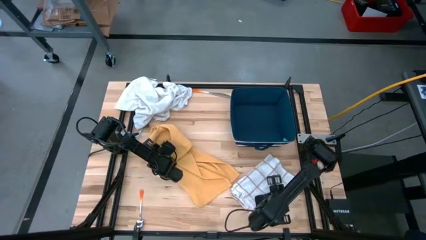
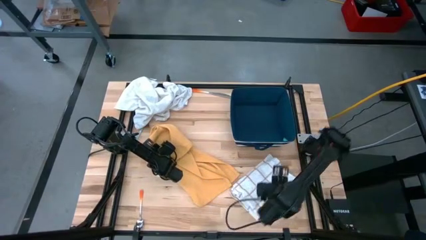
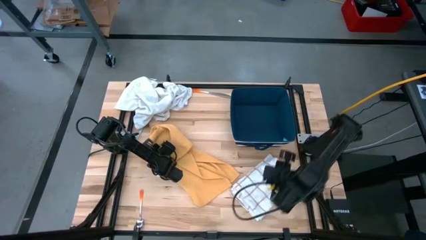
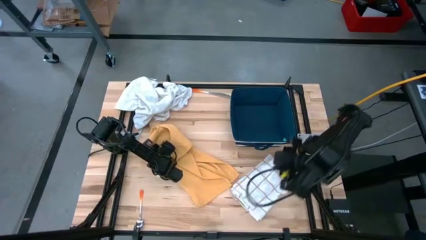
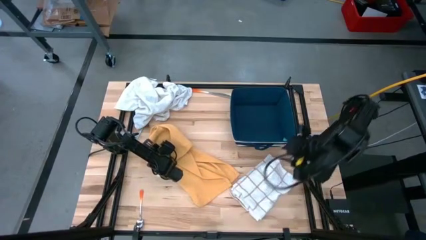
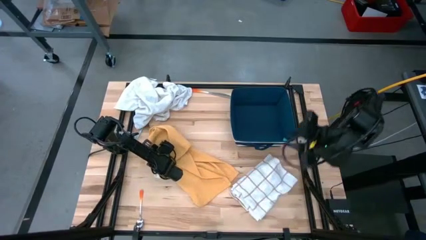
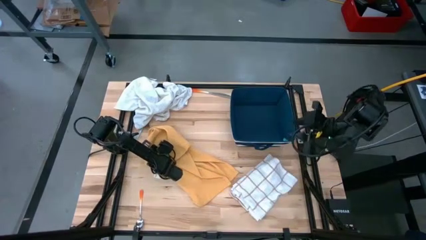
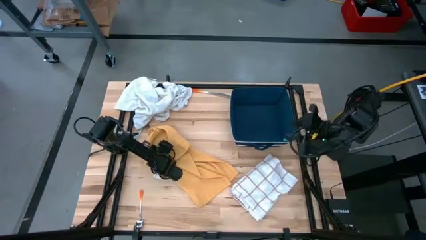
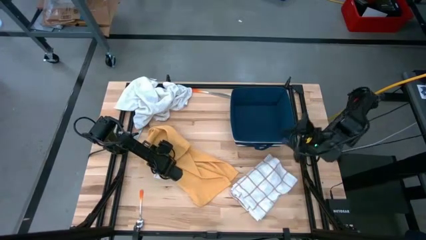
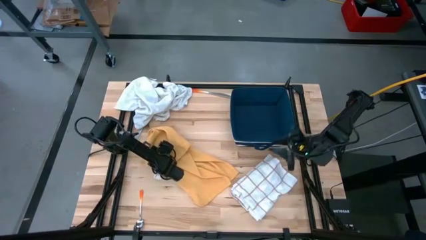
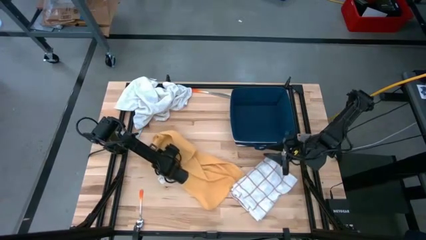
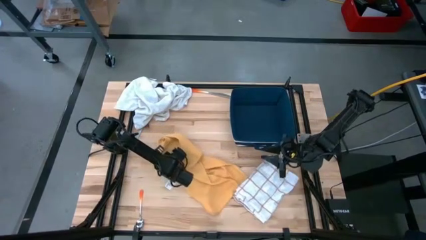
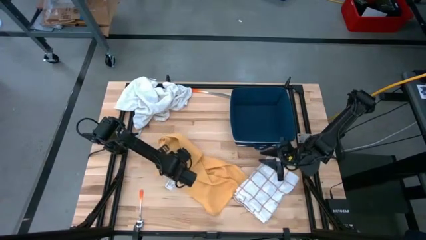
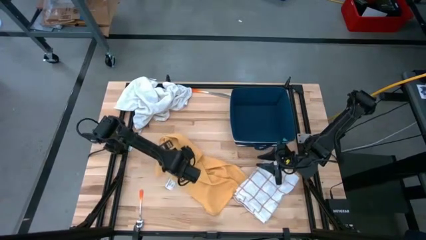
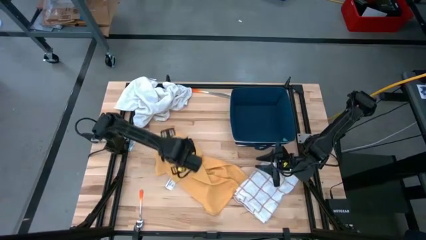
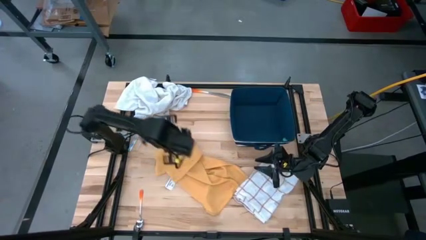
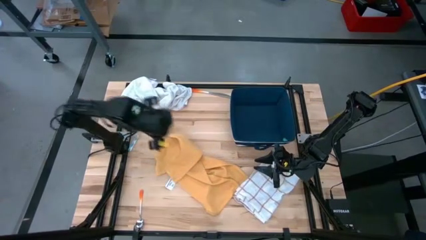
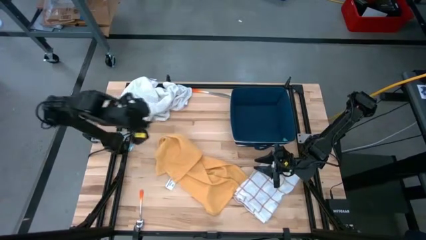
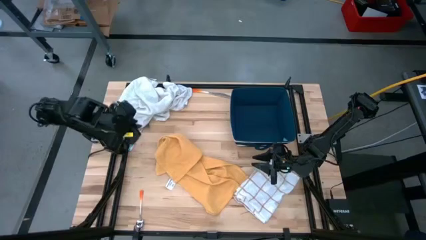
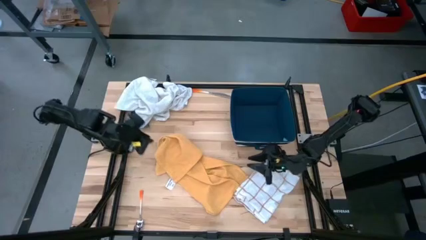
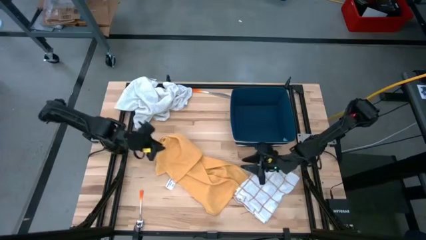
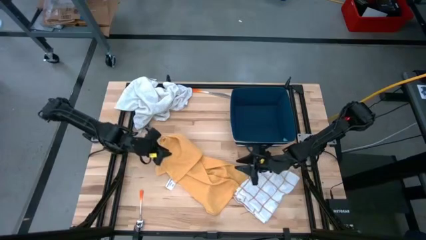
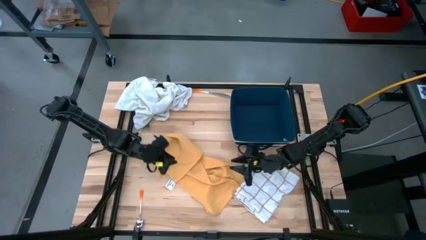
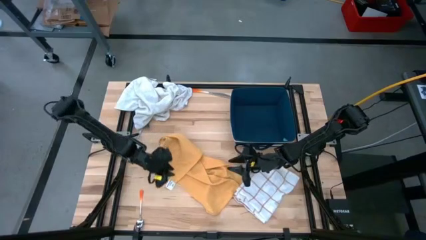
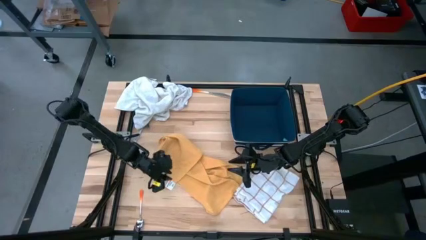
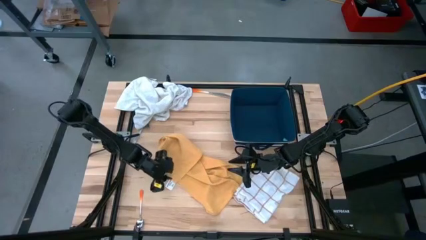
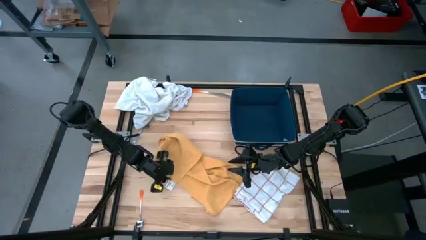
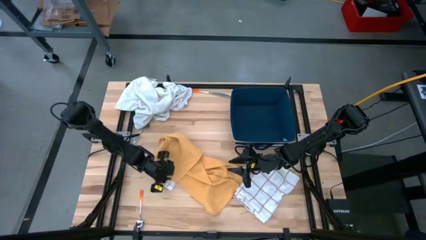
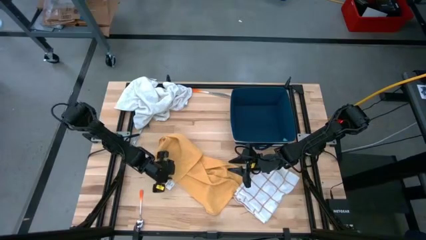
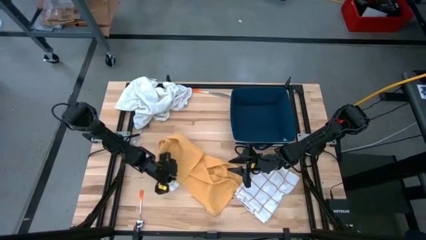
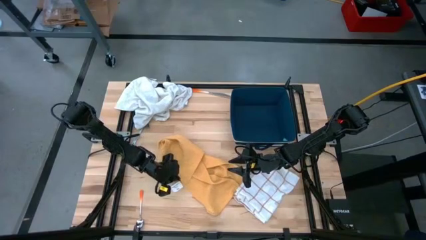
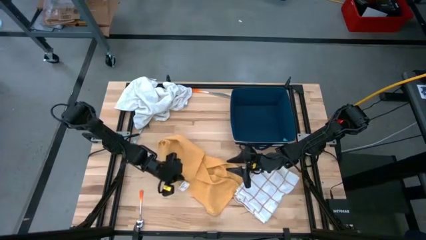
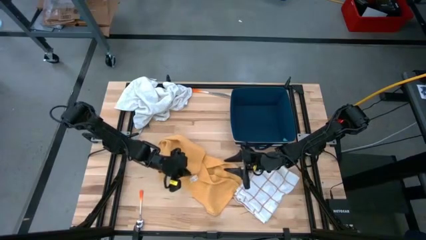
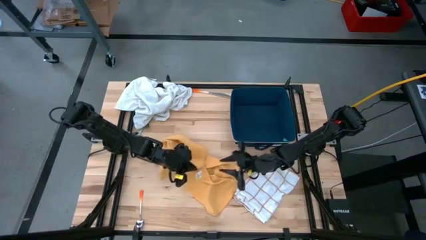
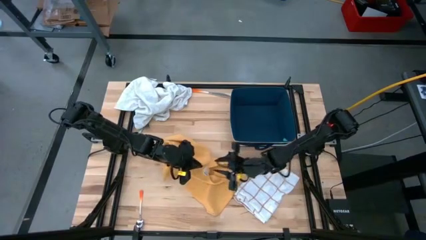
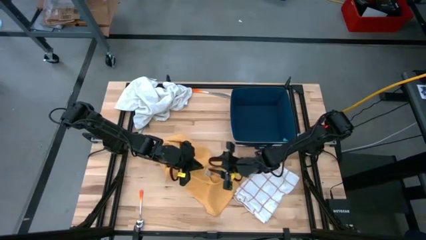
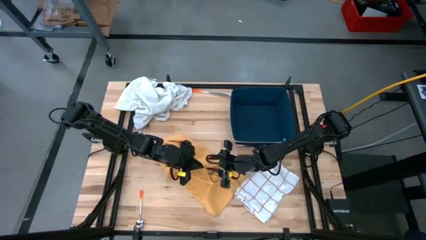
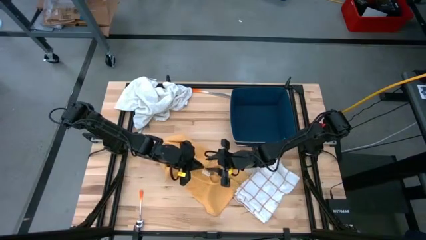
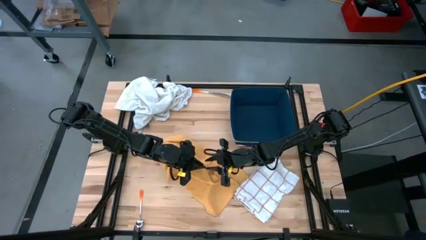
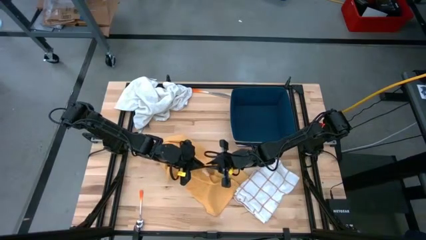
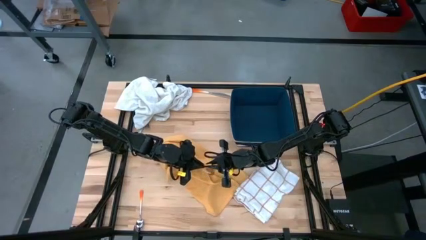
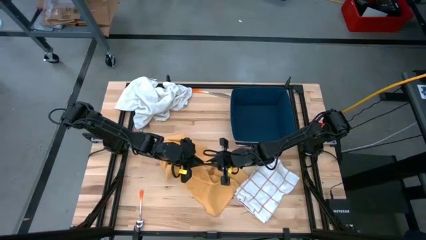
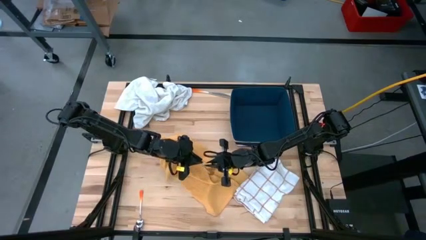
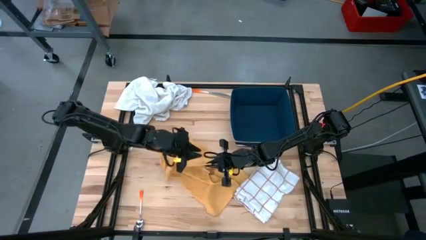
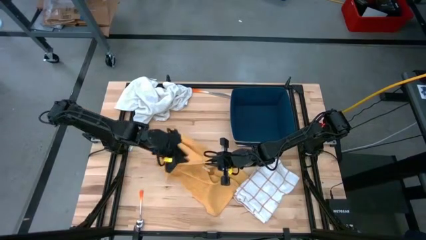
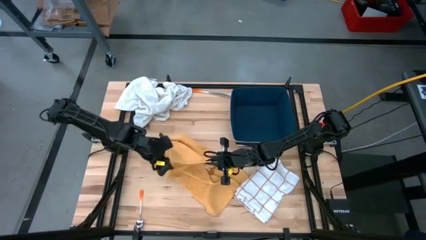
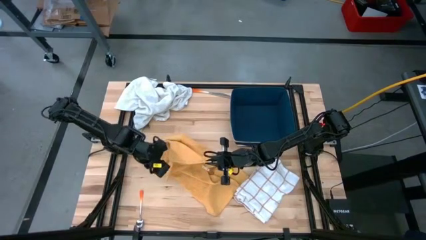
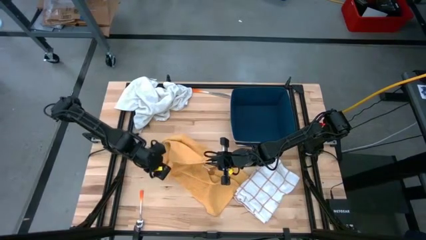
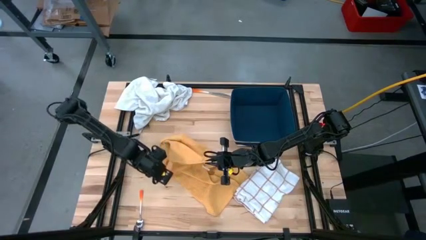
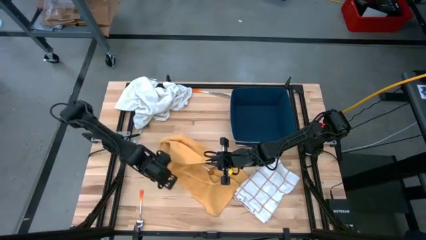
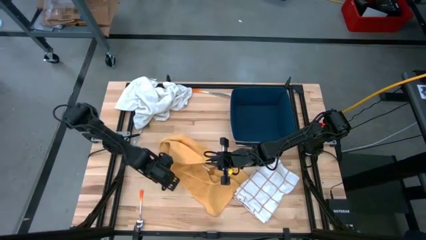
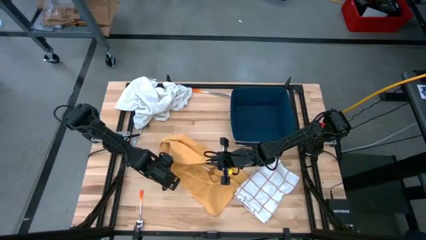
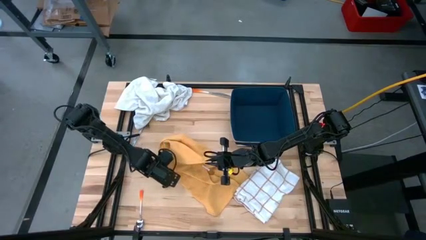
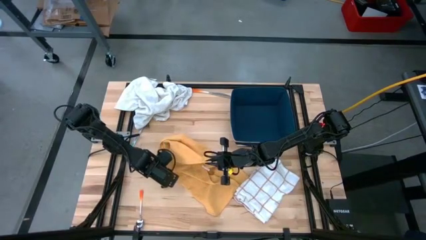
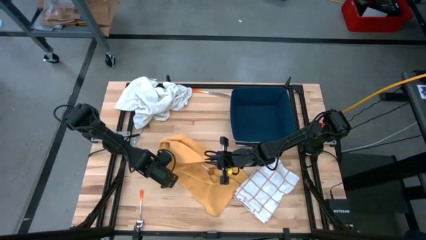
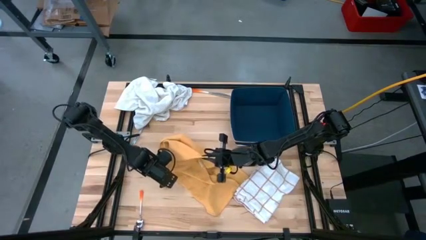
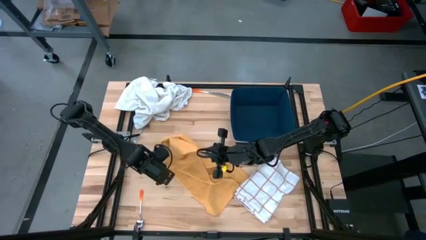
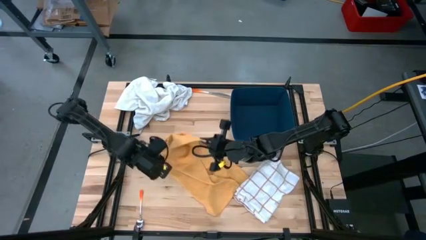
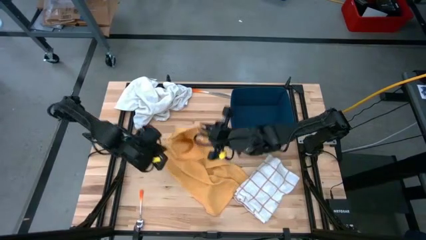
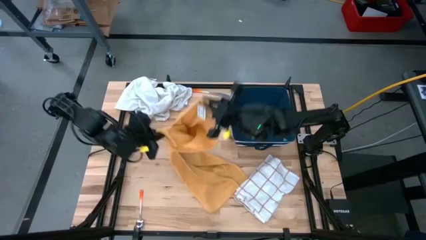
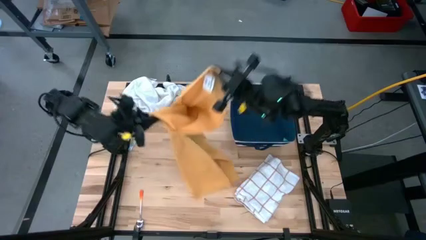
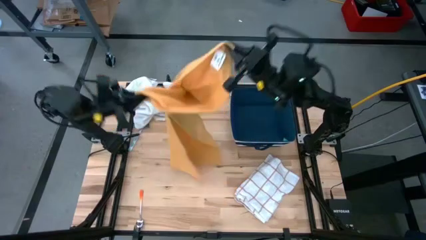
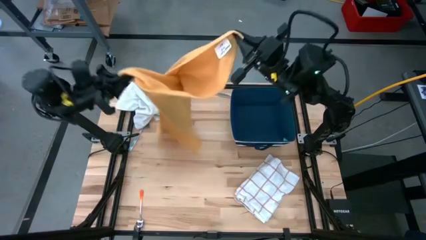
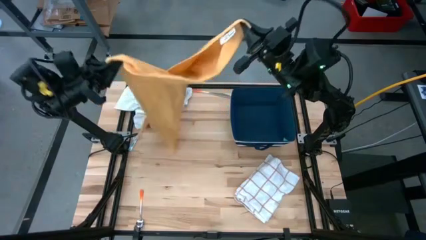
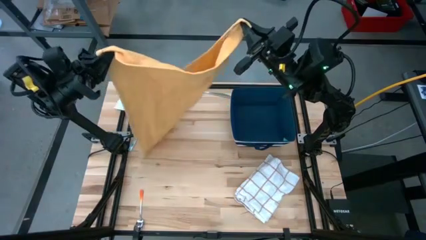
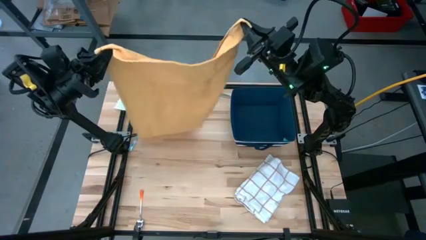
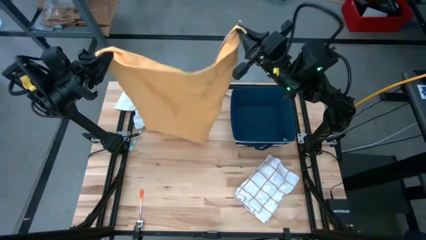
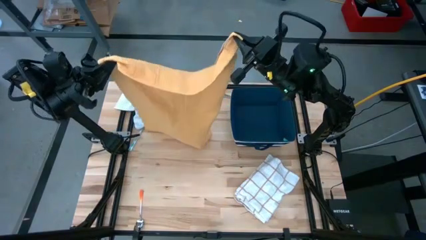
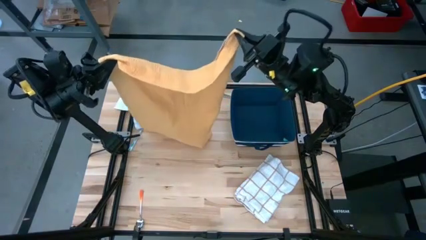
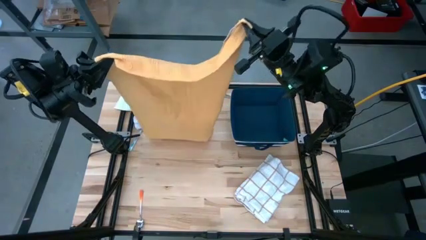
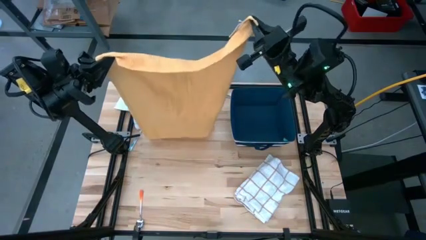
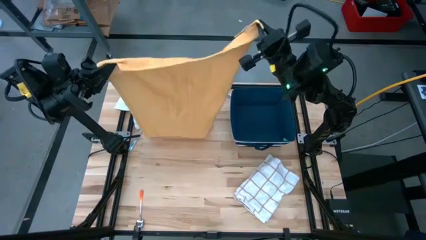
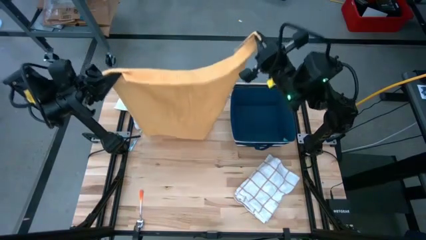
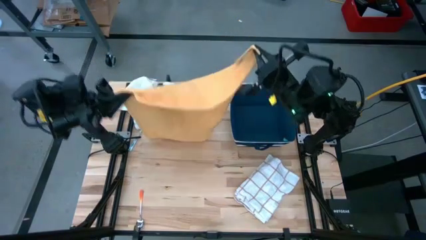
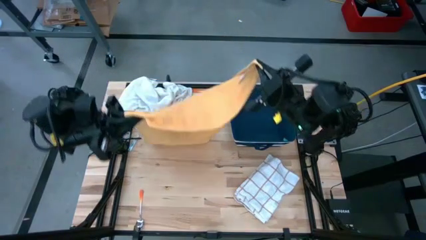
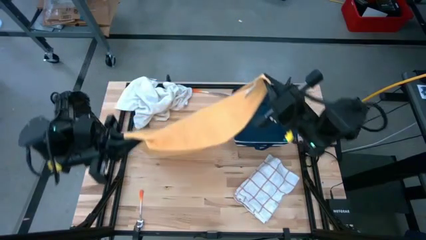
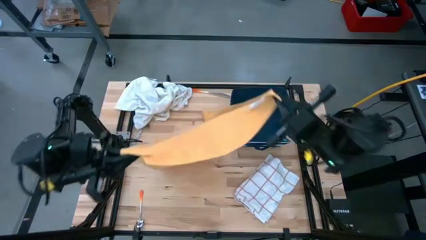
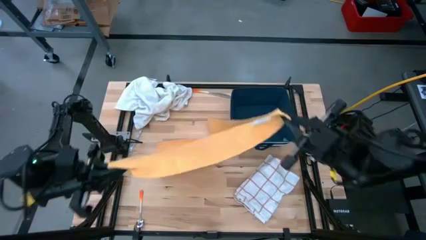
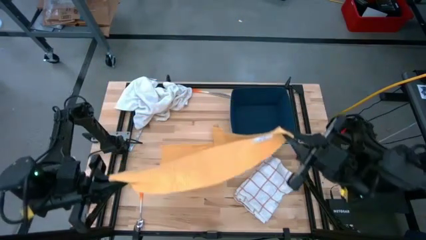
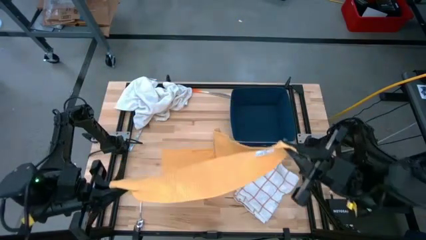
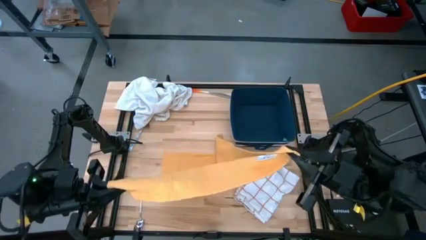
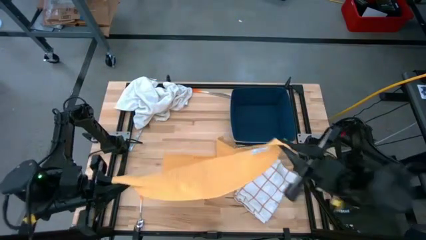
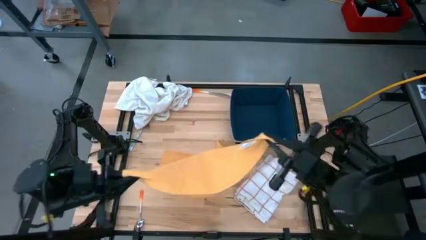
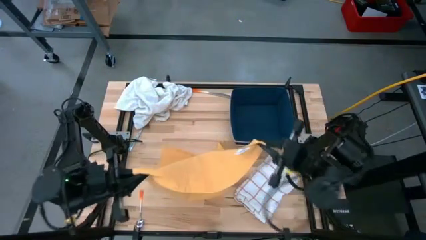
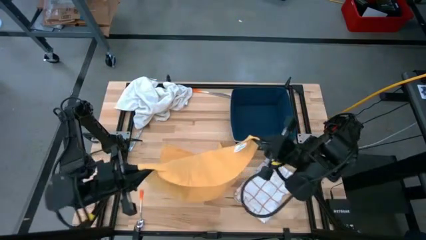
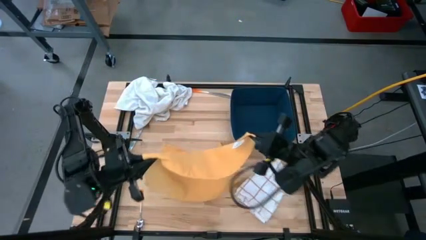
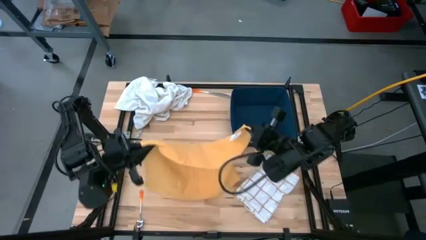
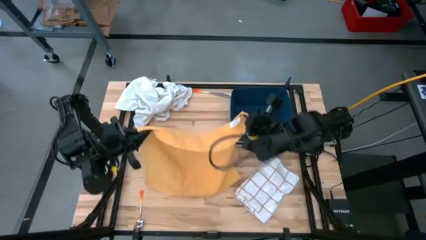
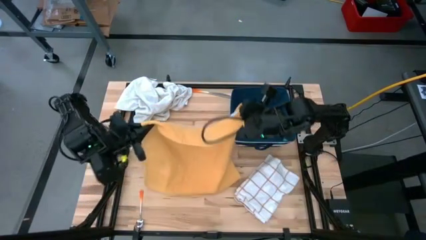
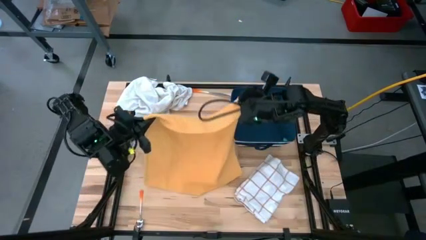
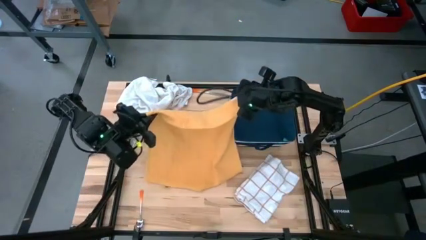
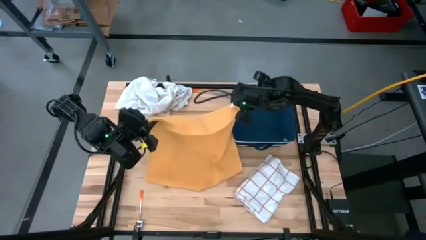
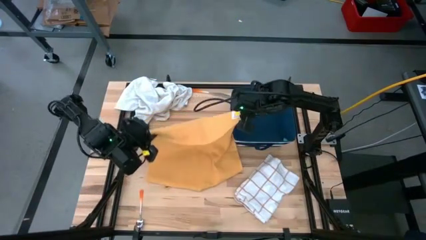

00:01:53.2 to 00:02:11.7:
Task: Fold towel
Fold the yellow towel
